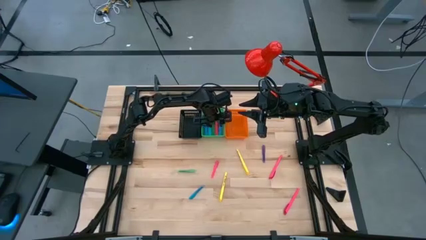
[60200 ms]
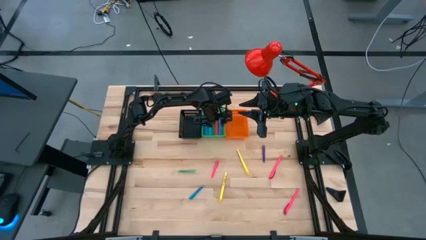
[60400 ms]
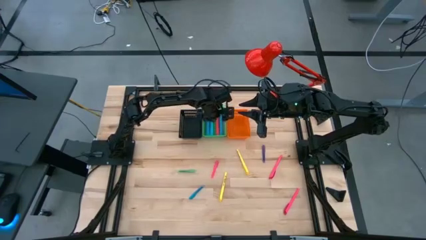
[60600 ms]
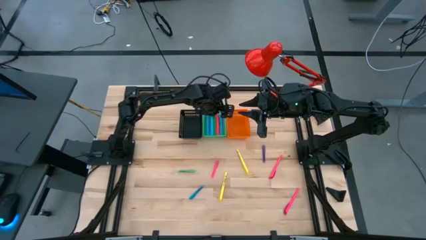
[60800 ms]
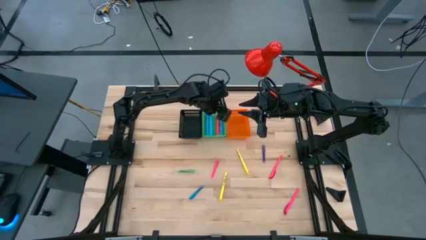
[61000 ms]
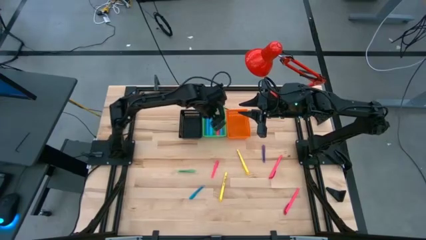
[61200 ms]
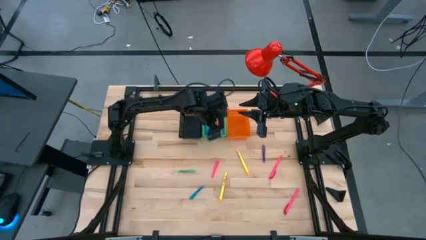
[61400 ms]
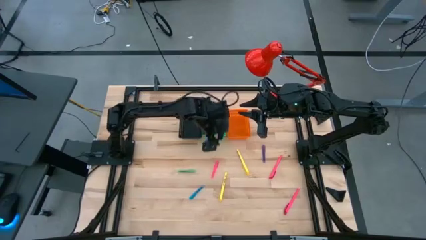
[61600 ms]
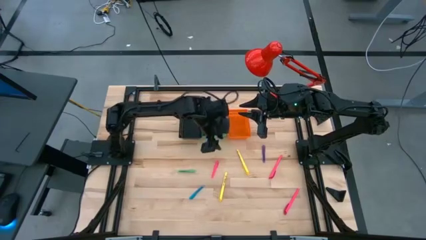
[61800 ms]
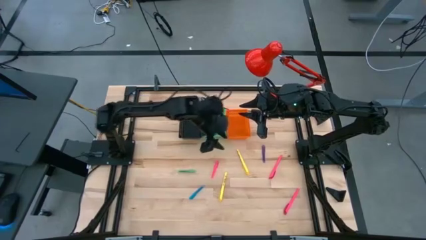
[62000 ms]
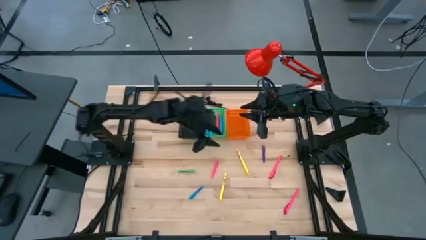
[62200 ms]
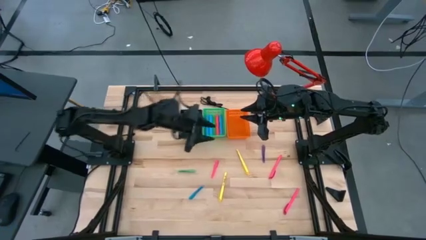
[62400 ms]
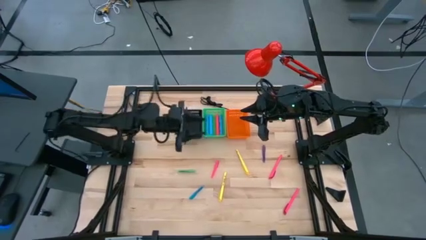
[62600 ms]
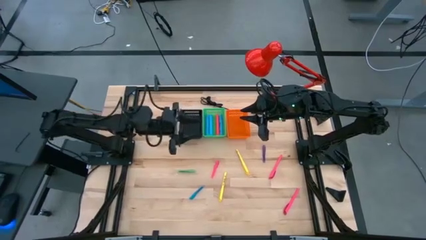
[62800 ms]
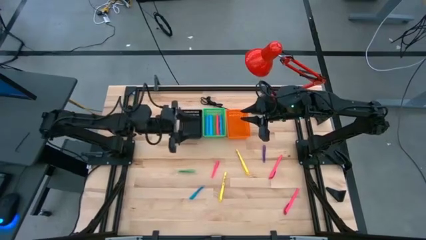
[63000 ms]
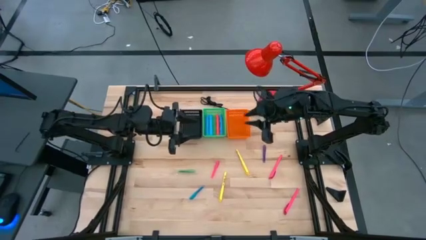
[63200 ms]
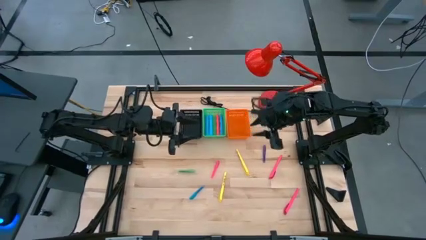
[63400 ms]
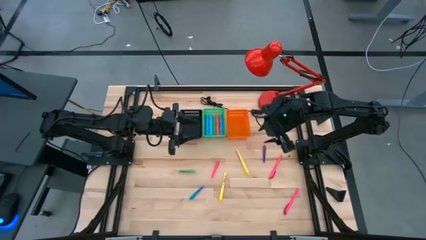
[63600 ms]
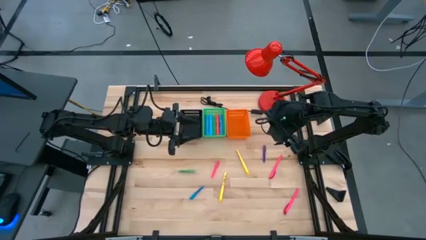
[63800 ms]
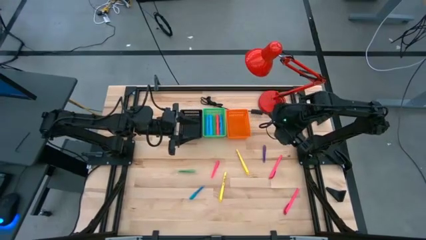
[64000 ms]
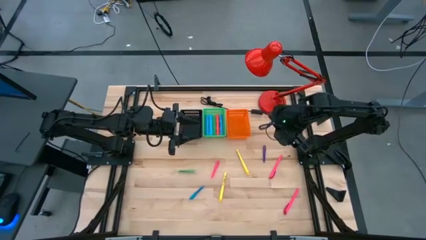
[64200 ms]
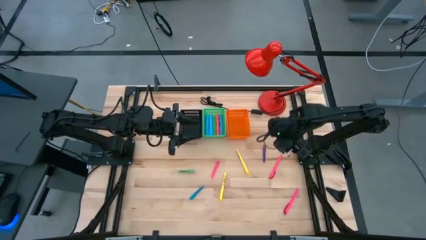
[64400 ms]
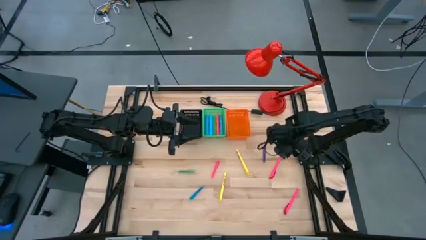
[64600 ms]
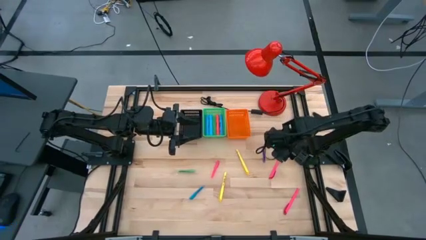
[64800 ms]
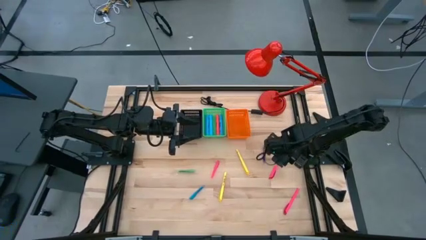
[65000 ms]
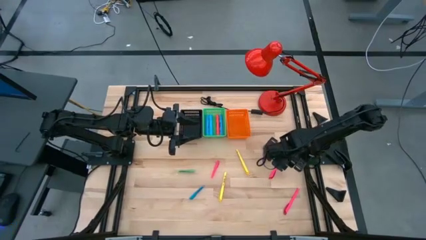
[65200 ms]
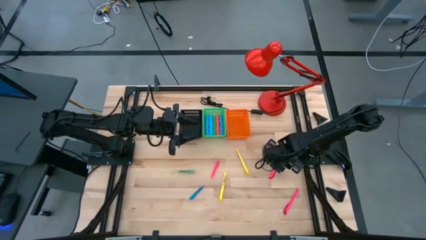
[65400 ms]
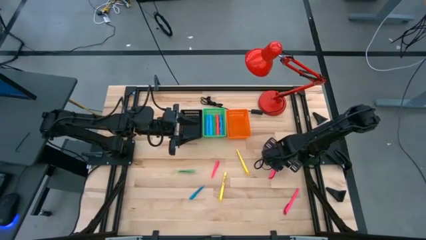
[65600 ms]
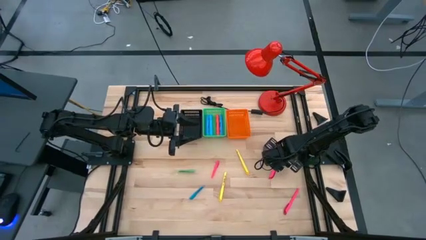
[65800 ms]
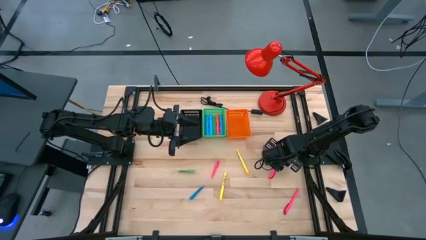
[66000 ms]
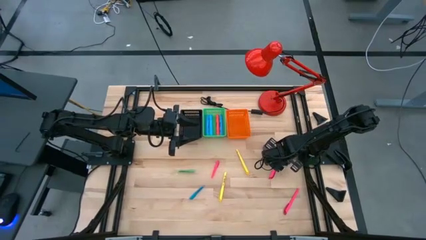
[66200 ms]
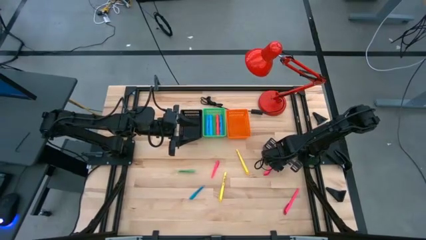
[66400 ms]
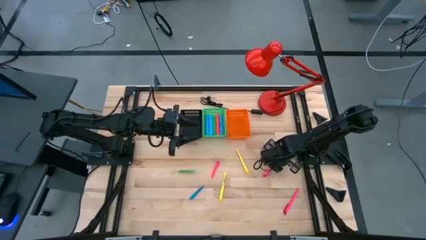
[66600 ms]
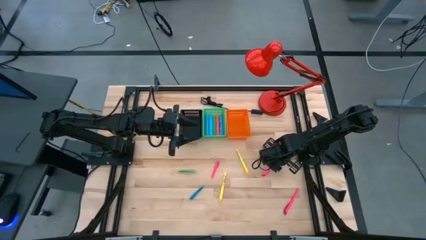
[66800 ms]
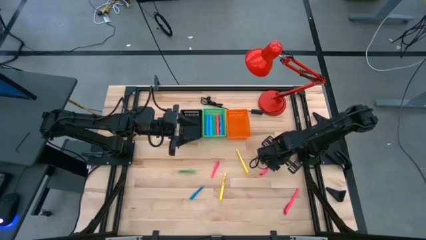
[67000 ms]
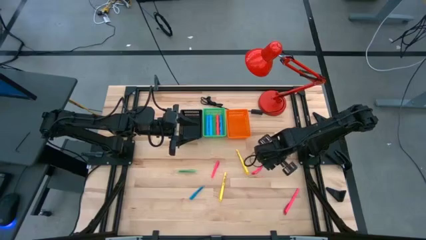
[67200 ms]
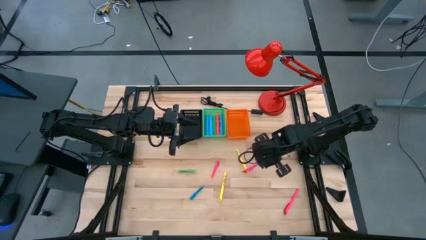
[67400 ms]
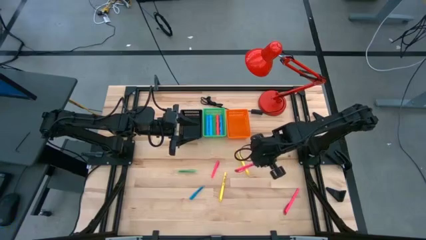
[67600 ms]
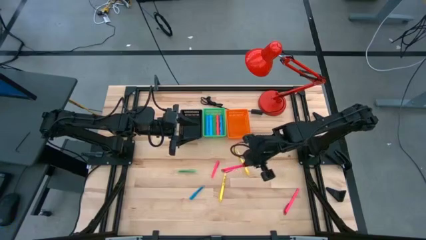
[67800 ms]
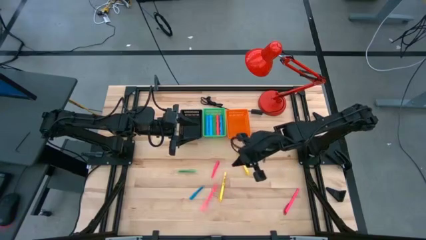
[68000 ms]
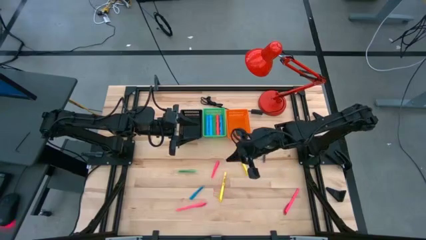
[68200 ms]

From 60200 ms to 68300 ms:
Task: Pick & Place Markers
Put the top large pink pen into the black bin

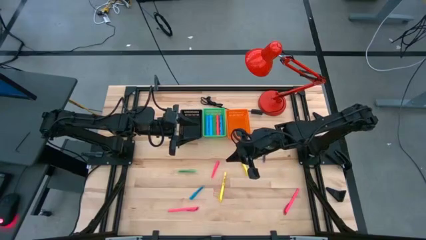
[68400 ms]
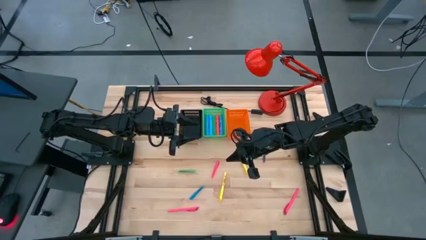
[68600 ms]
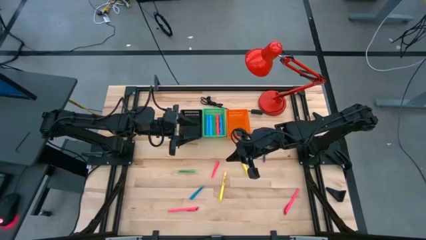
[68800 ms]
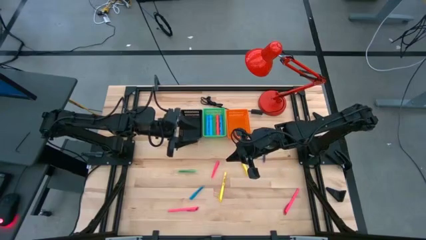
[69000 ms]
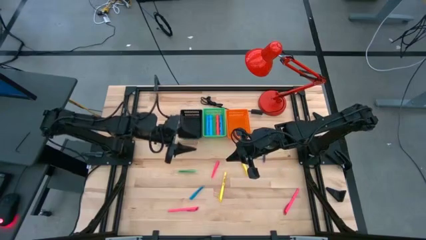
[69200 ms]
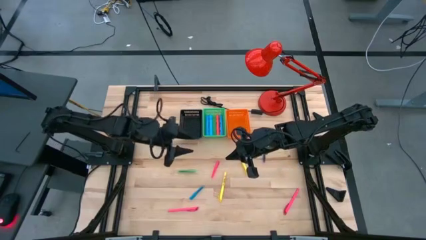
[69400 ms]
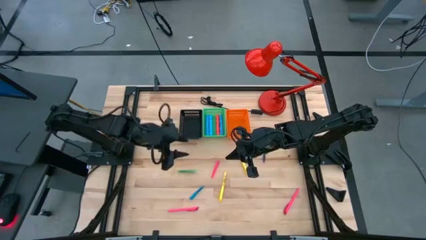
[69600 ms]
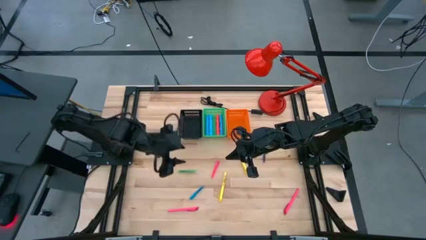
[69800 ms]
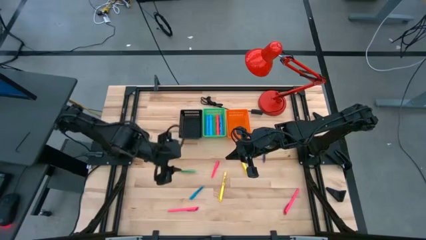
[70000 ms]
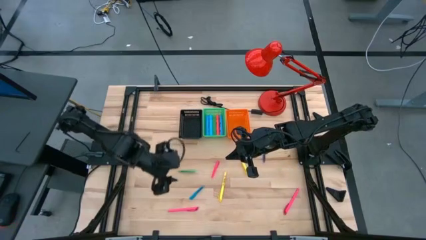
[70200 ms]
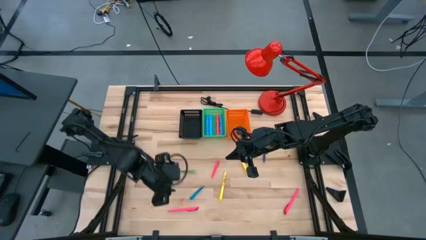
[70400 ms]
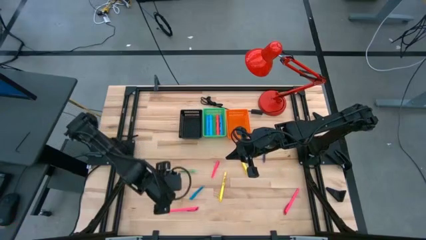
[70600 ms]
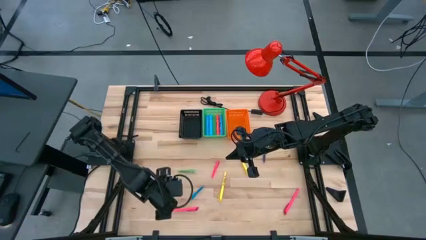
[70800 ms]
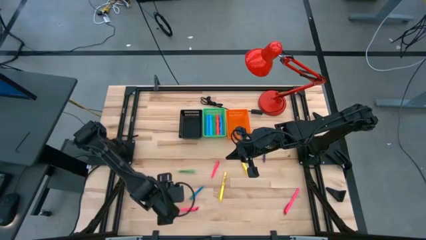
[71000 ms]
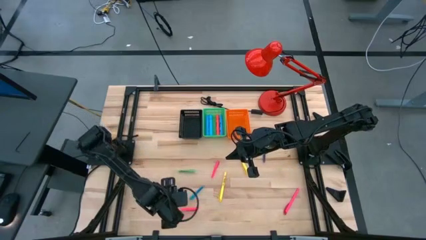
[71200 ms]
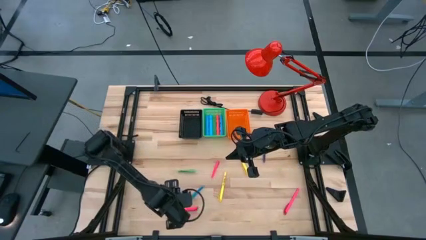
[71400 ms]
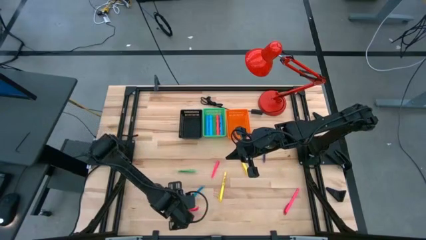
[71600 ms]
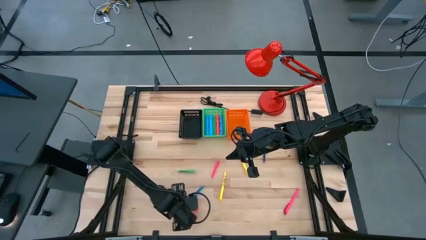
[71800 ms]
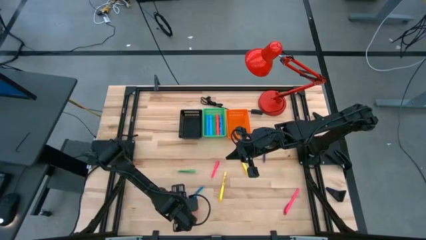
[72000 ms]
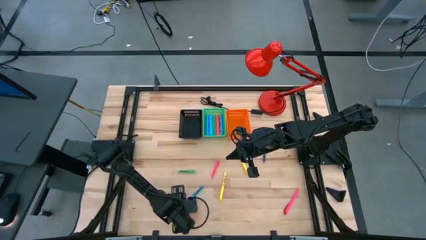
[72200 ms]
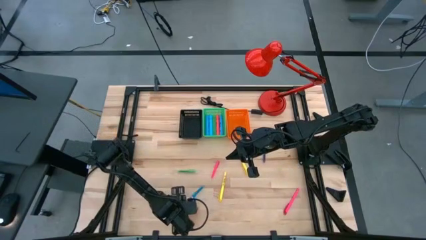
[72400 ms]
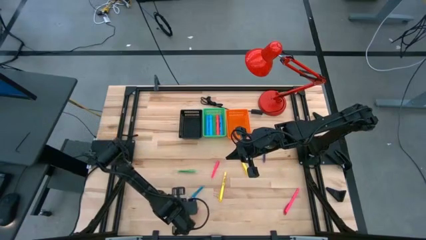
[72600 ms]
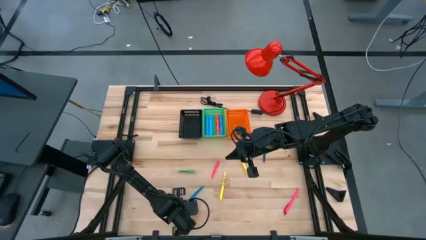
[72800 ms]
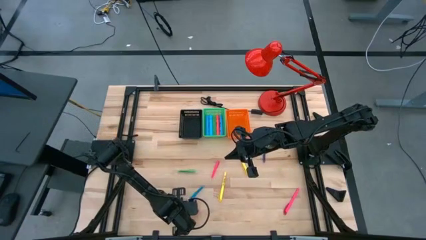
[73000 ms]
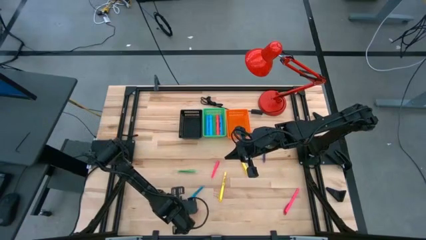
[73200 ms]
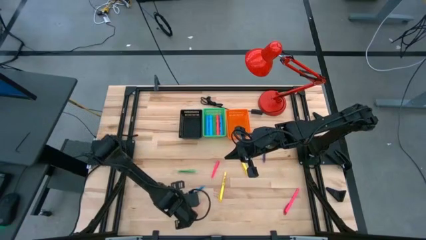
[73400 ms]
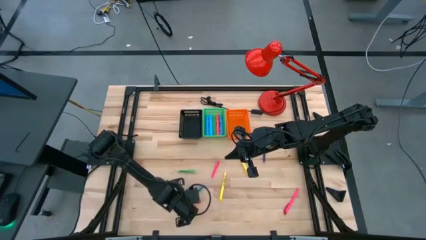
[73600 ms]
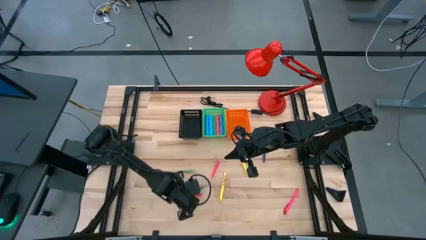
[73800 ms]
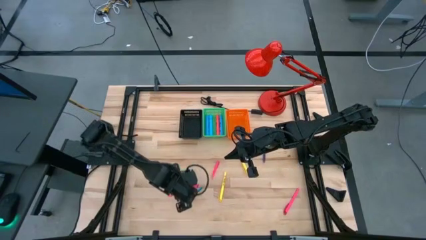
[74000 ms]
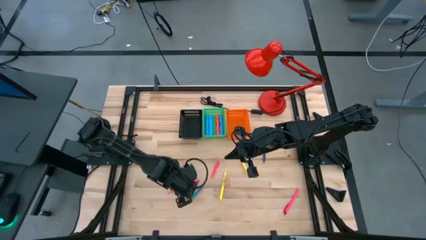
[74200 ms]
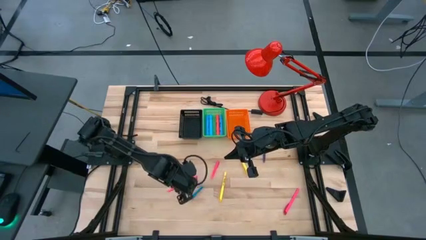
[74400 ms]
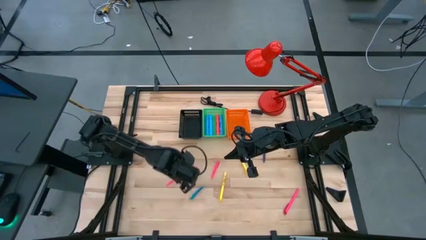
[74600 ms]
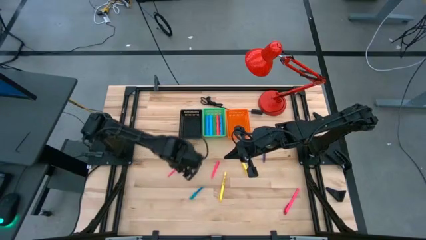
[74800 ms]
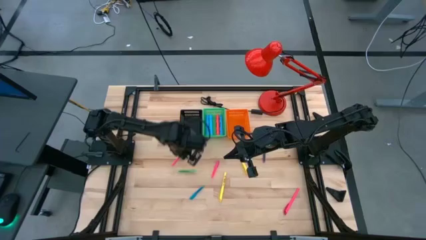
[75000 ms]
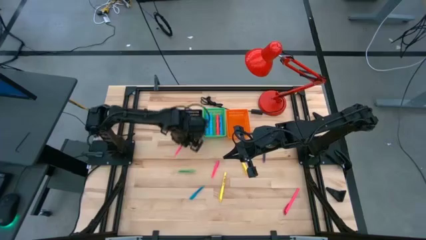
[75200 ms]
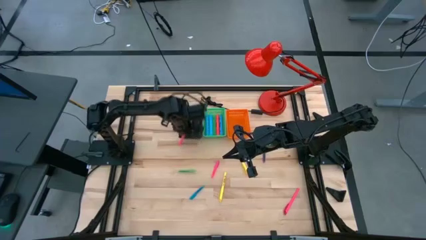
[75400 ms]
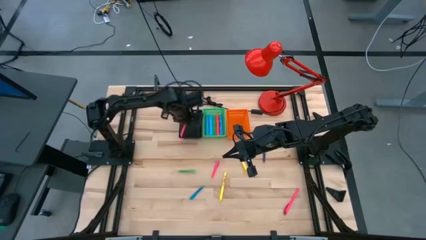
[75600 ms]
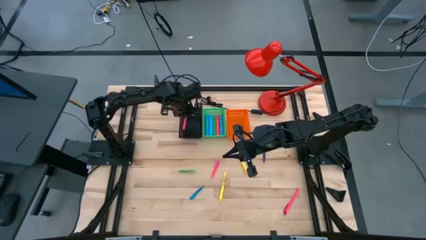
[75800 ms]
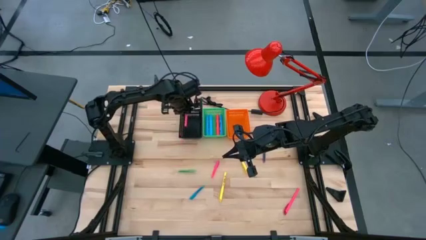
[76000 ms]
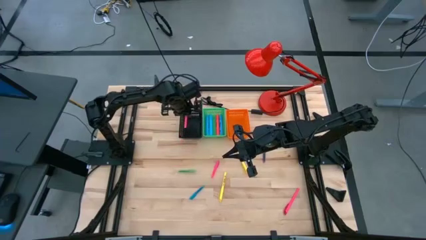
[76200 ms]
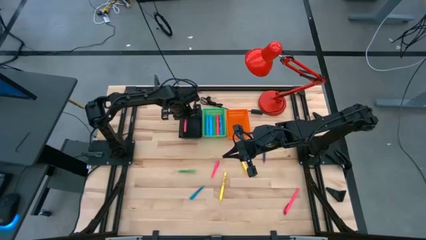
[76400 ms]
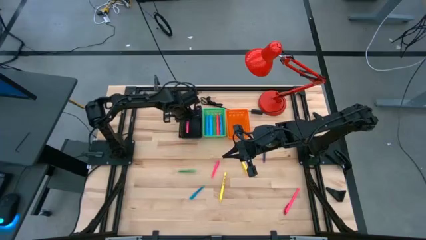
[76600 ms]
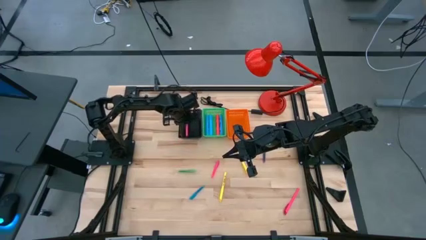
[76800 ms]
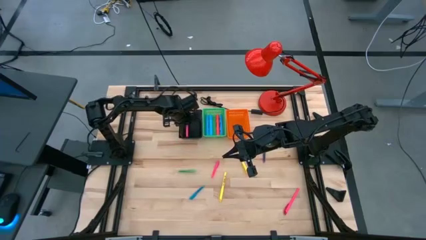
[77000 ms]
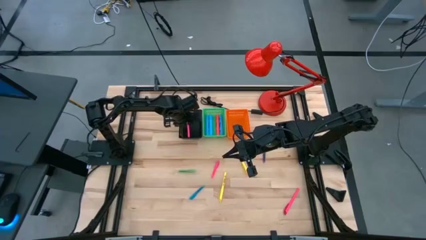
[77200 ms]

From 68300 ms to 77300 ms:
Put the left large pink pen into the black bin
